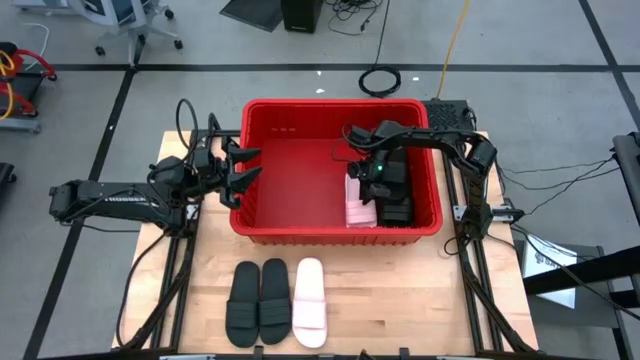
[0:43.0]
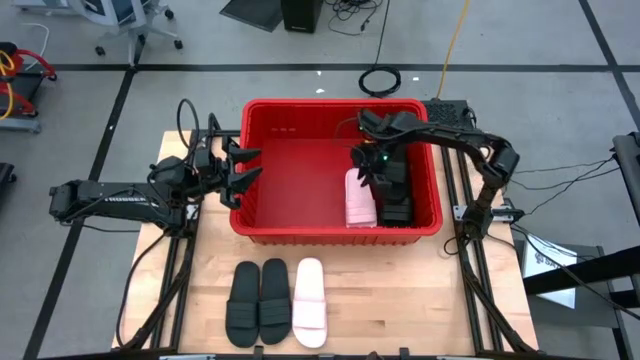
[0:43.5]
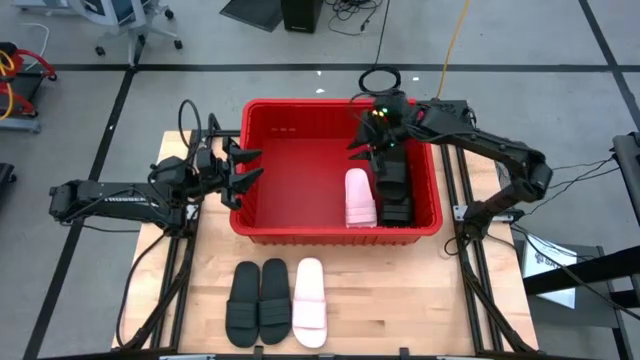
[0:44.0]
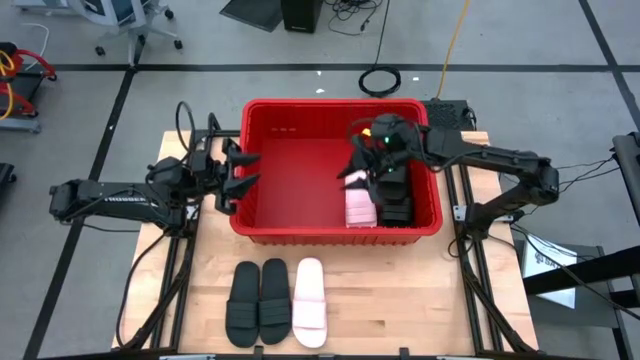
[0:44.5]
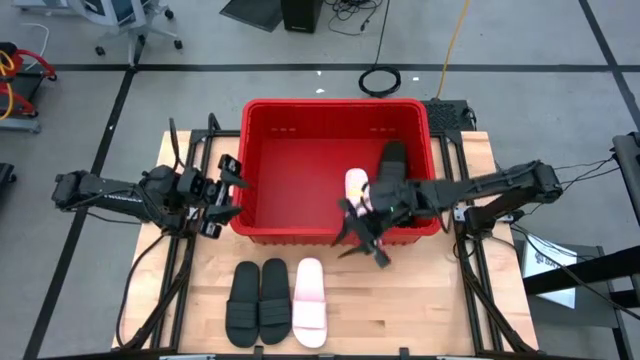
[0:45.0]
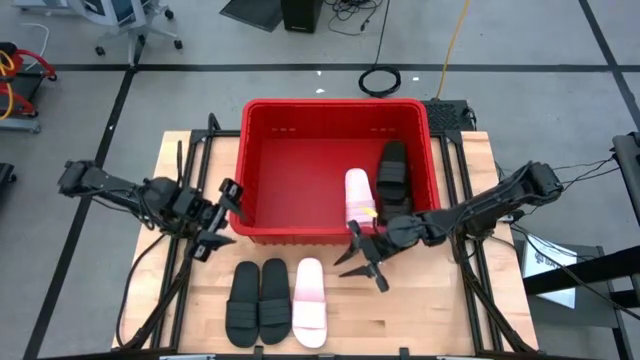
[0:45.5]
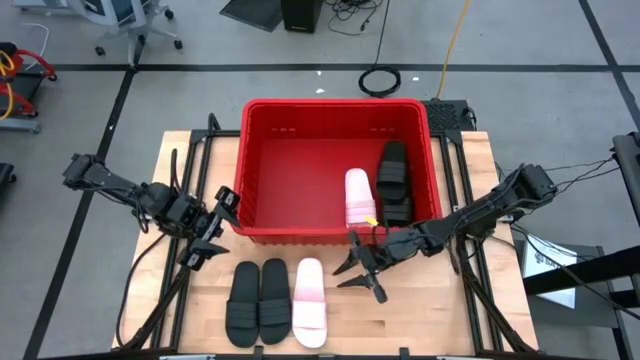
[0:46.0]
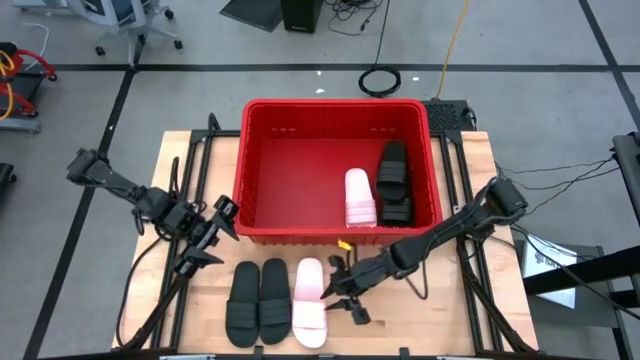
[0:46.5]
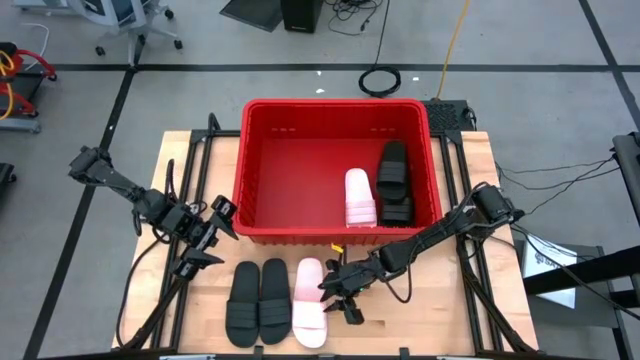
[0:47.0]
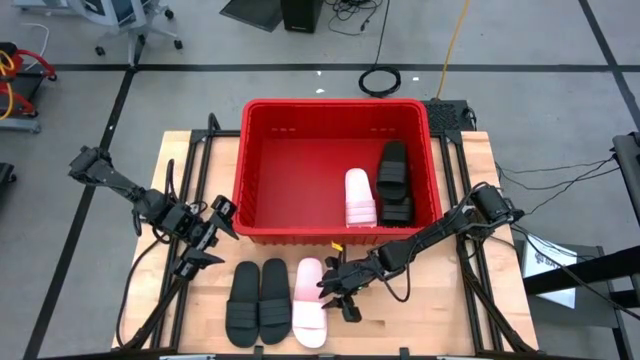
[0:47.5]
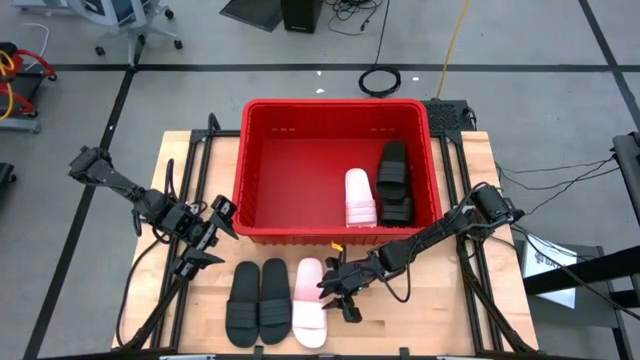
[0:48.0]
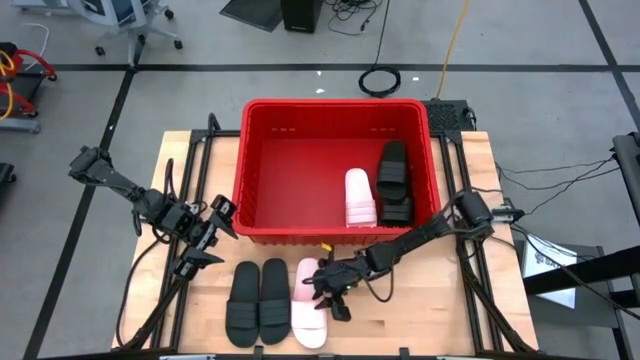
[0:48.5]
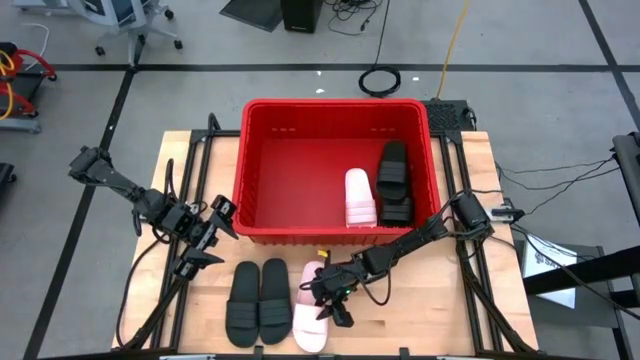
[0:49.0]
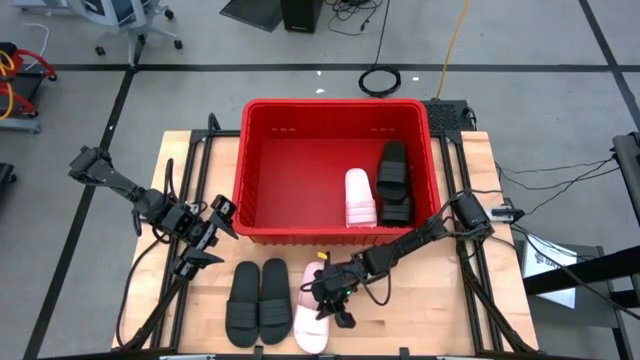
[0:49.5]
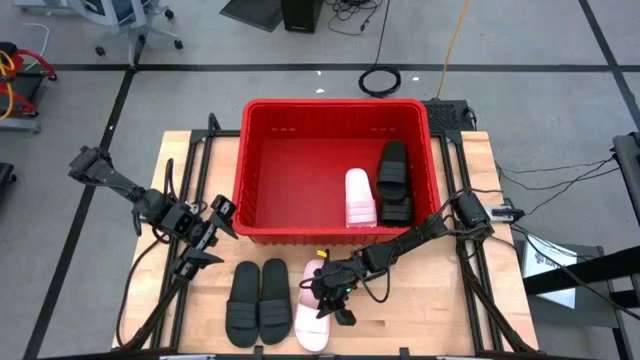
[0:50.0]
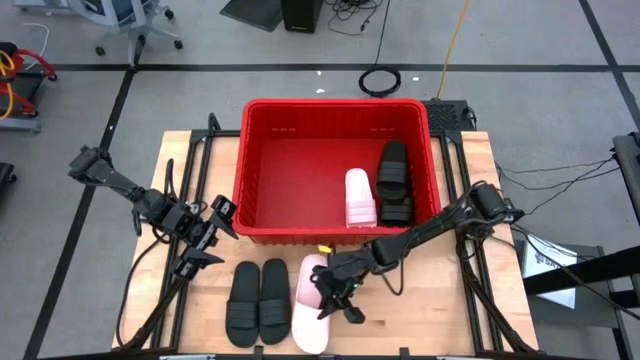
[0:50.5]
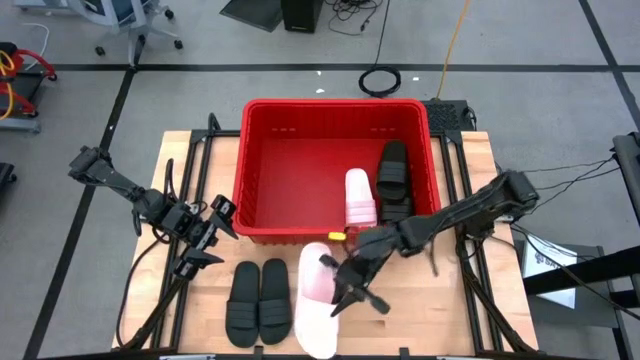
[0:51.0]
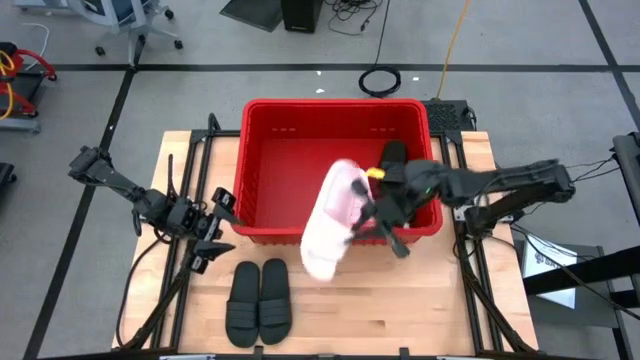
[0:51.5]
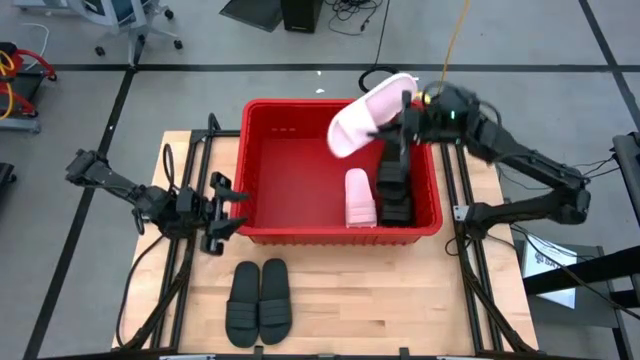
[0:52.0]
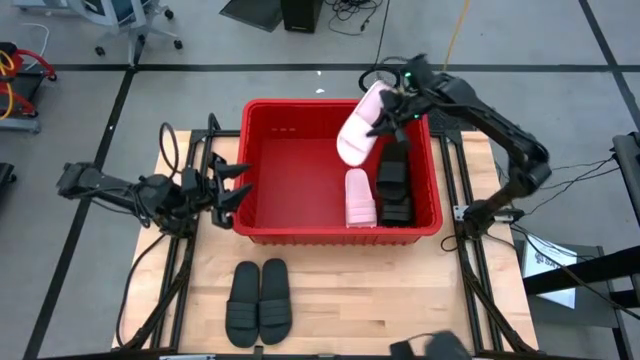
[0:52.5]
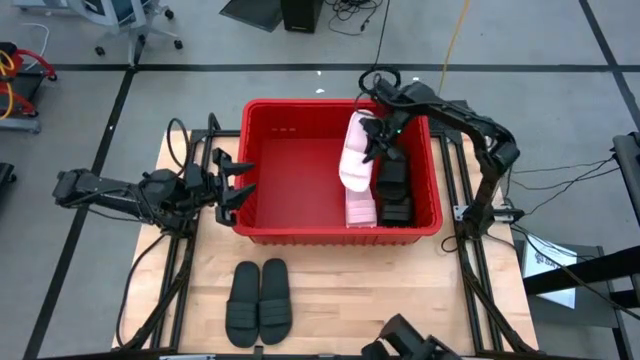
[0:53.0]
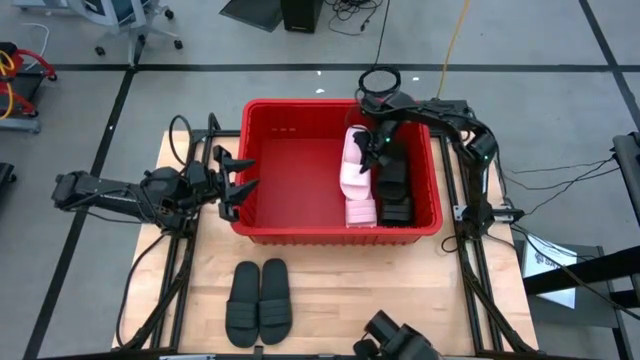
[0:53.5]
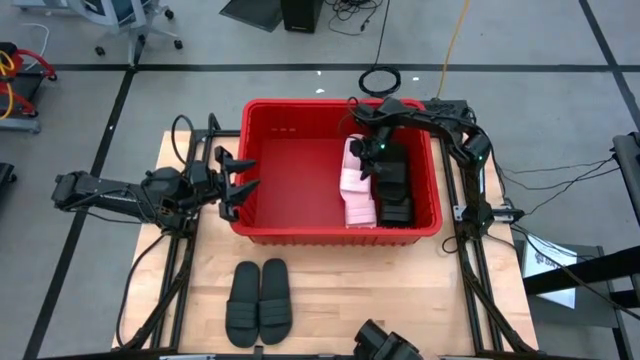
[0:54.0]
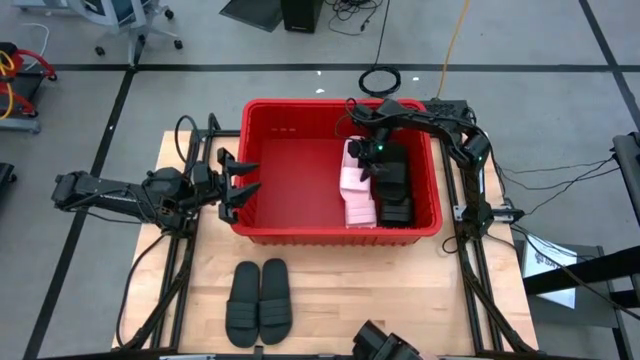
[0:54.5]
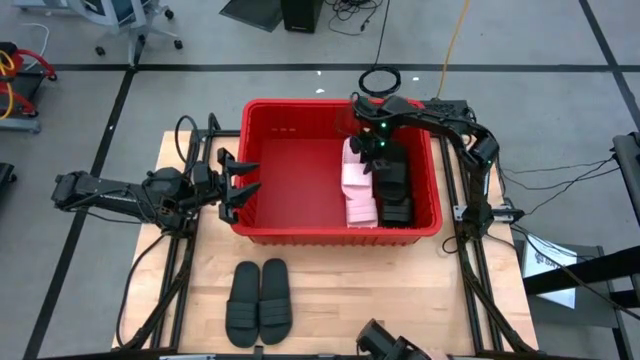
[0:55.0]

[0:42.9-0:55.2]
Task: Pick and place slides into bin
Put the left white slide into the red bin

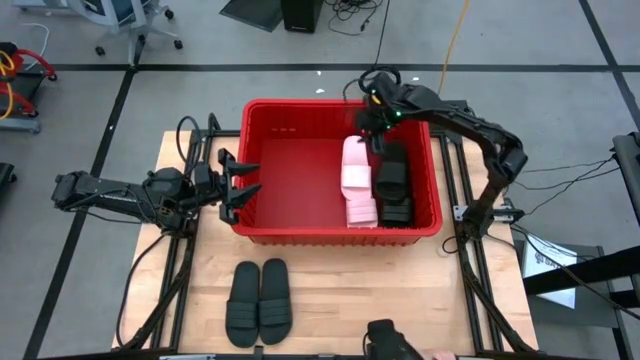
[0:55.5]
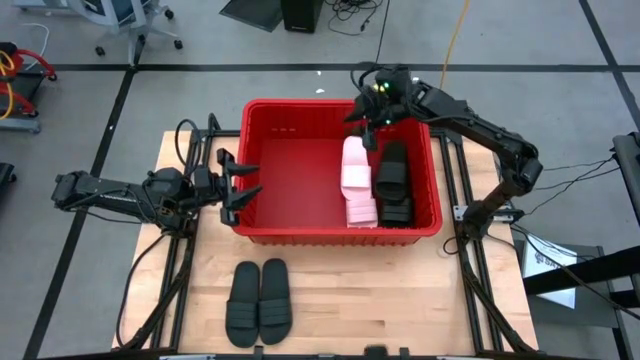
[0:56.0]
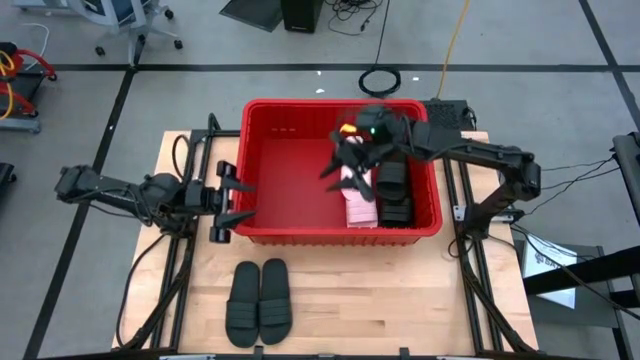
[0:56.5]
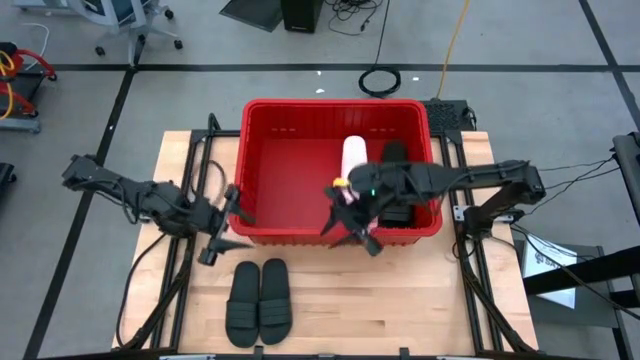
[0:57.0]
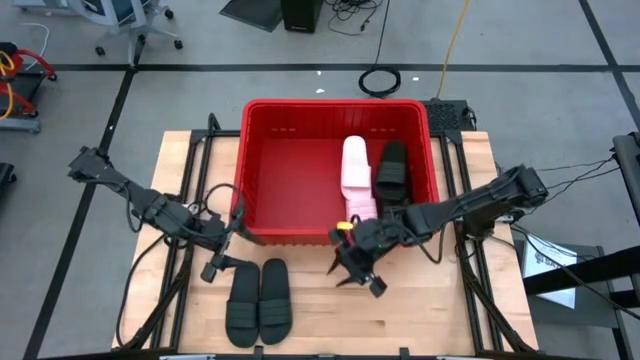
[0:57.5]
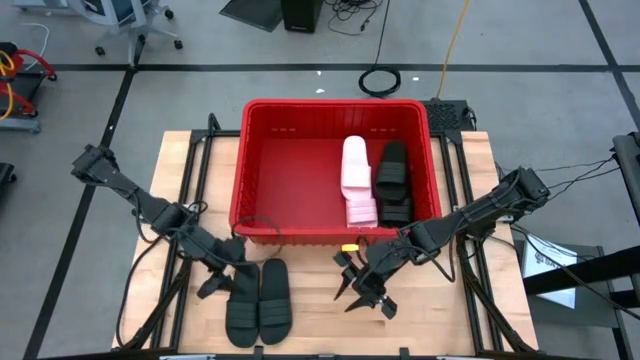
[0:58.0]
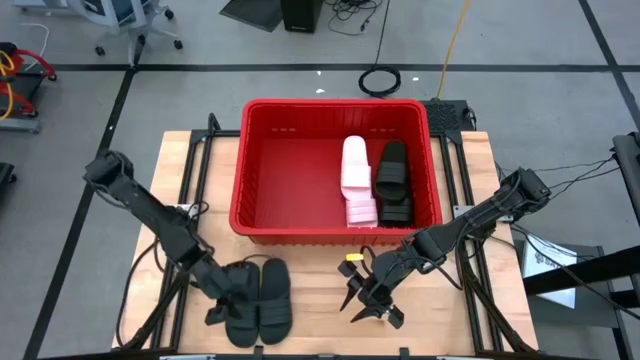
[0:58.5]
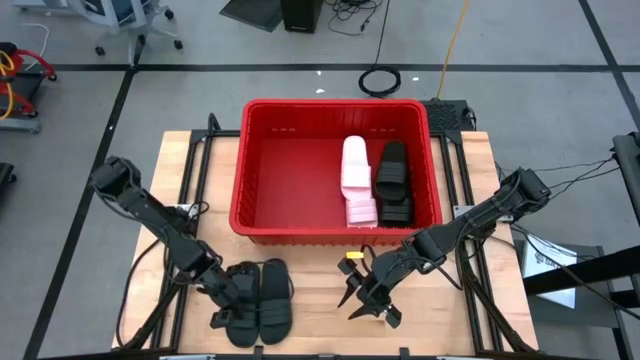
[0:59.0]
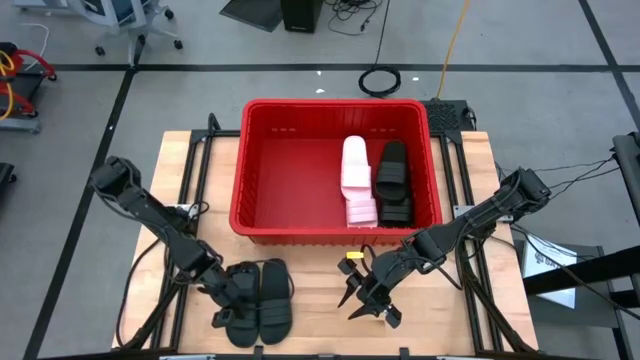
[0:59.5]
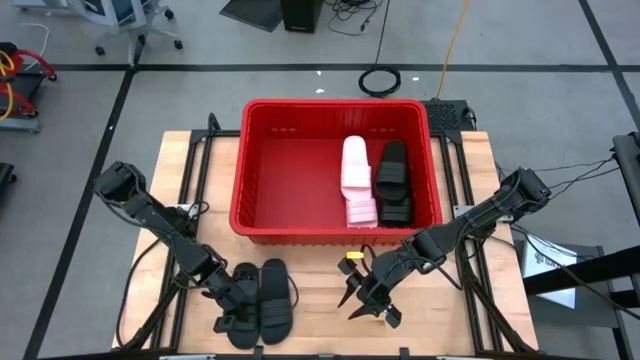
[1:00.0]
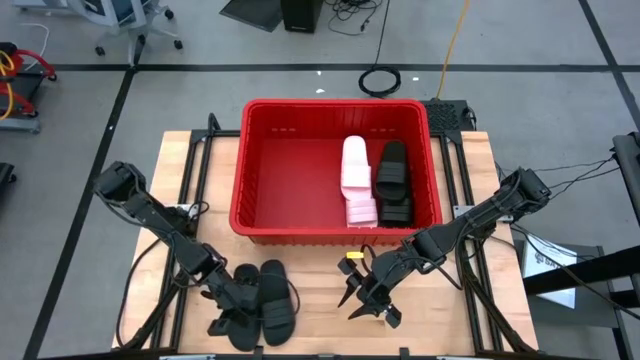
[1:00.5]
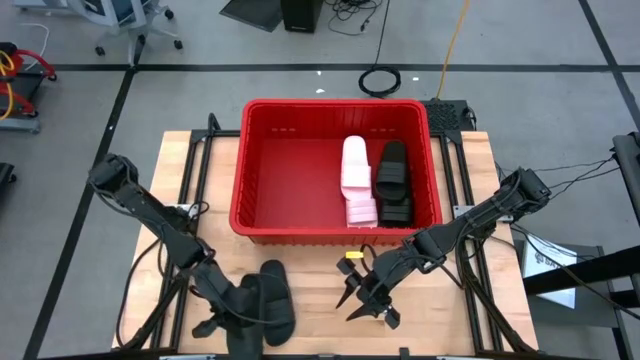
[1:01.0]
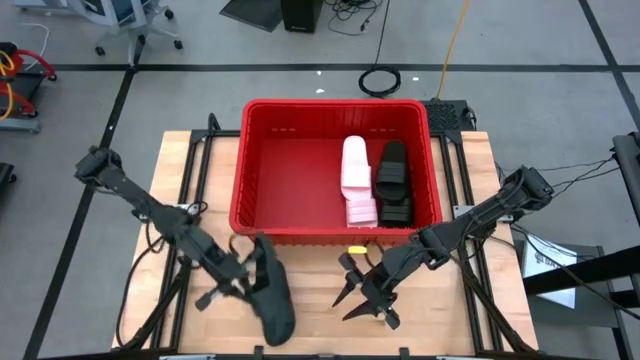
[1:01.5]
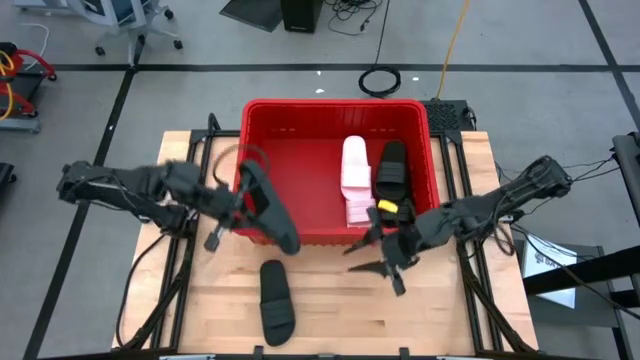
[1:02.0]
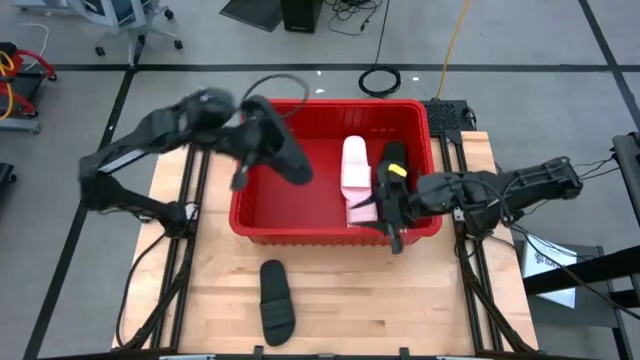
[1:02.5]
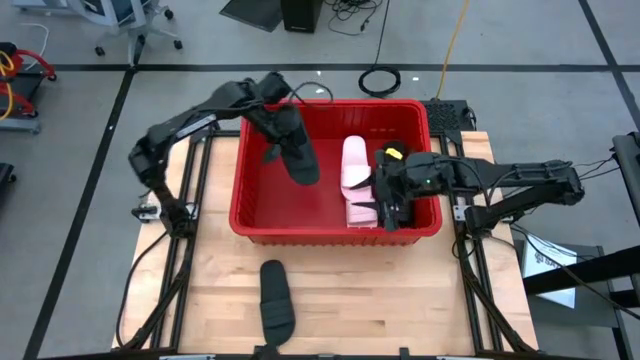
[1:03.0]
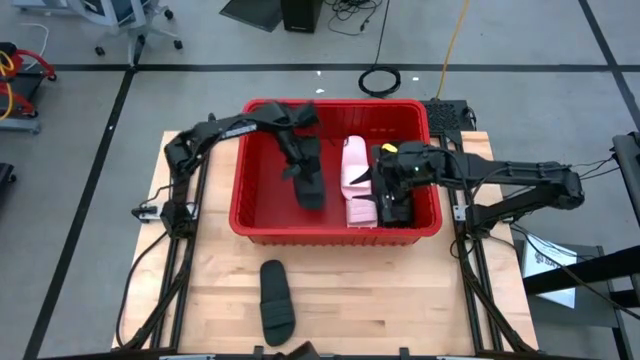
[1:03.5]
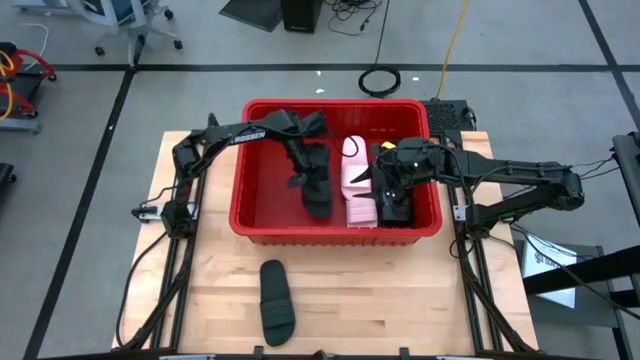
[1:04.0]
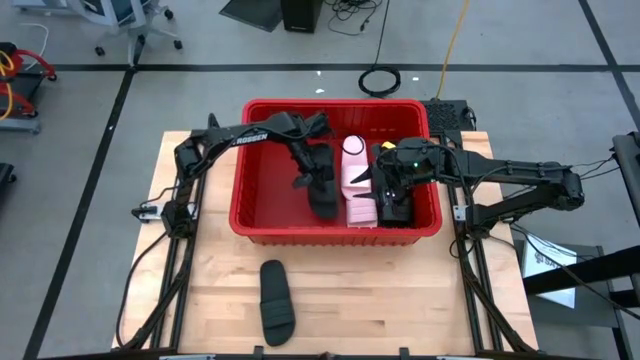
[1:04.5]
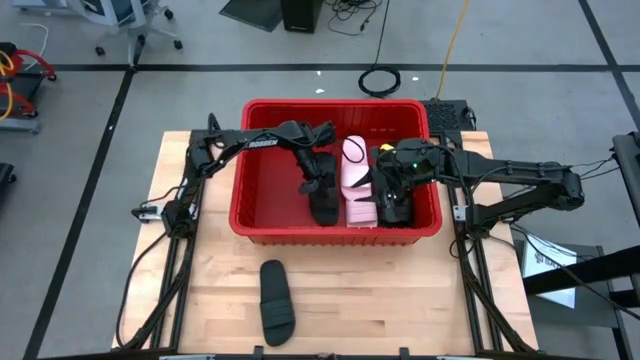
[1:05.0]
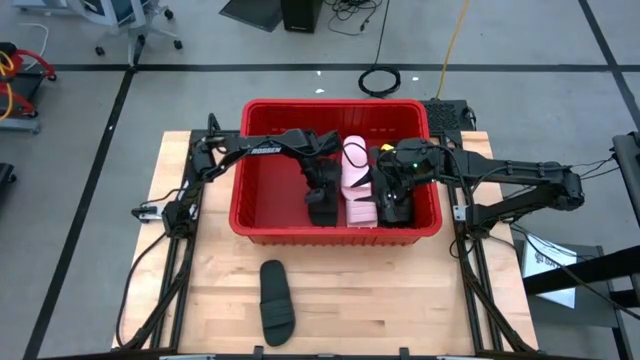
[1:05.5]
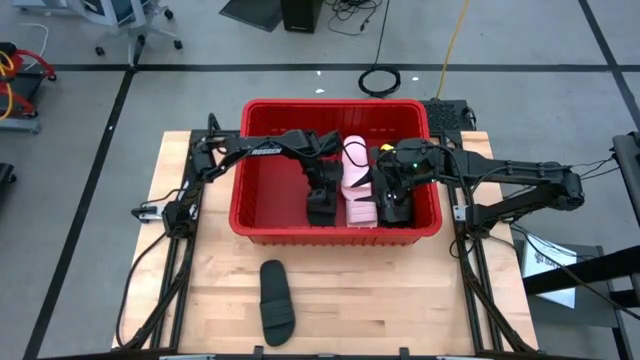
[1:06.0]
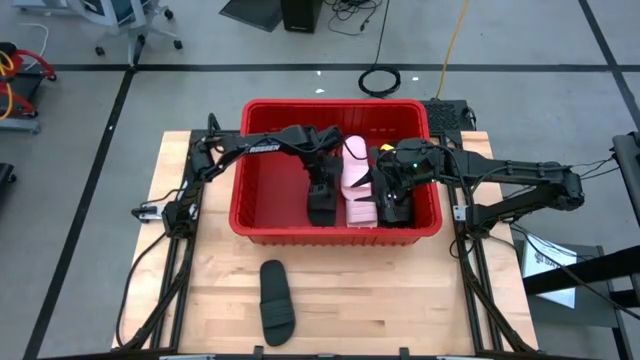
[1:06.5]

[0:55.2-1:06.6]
Put the left black slide into the red bin
